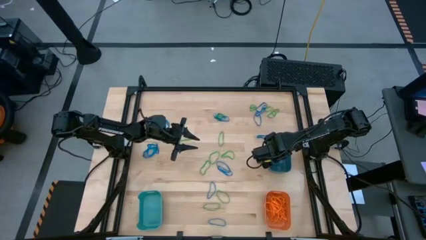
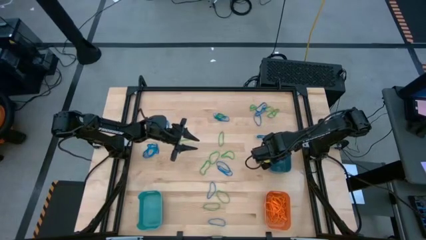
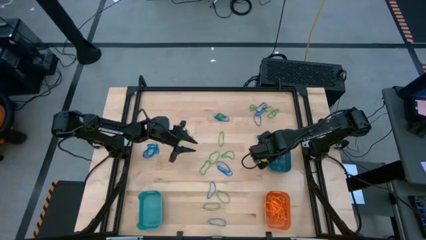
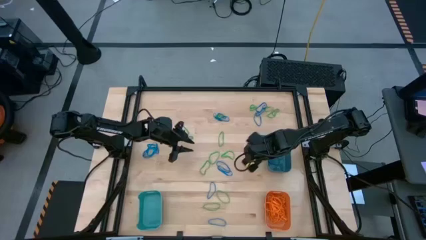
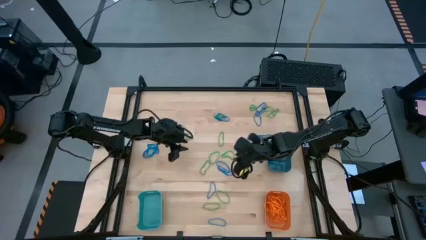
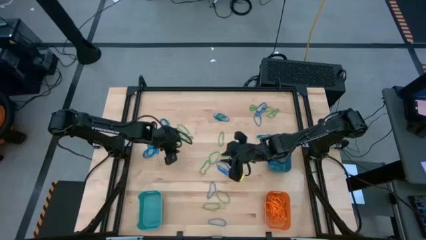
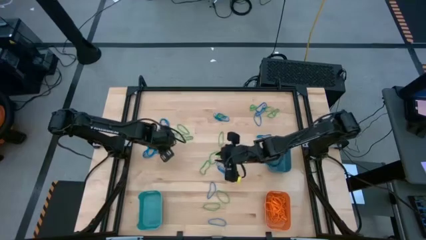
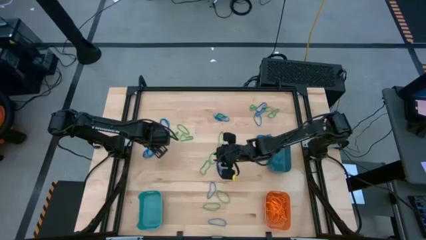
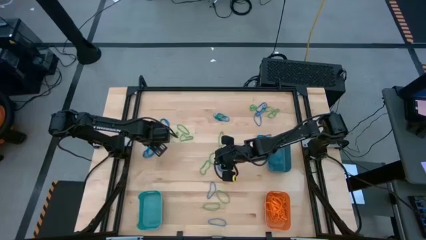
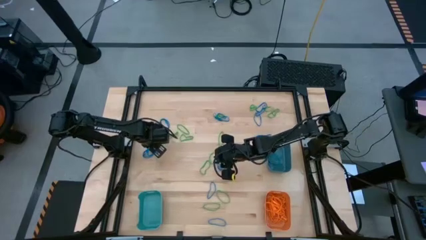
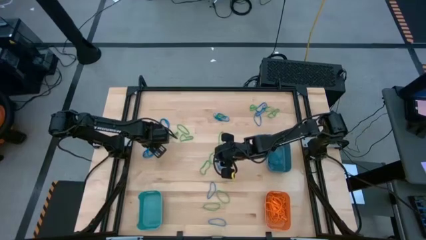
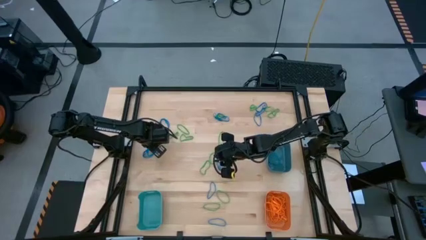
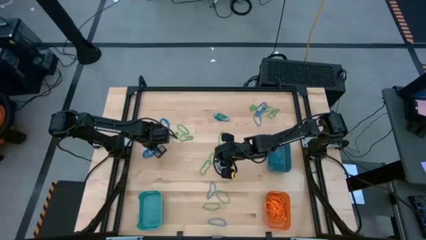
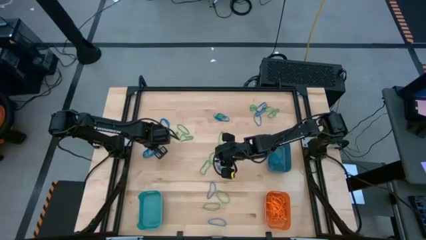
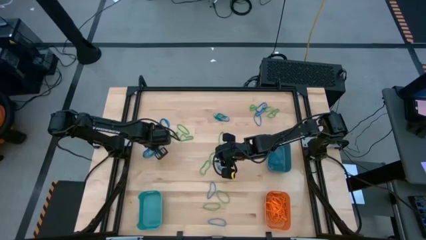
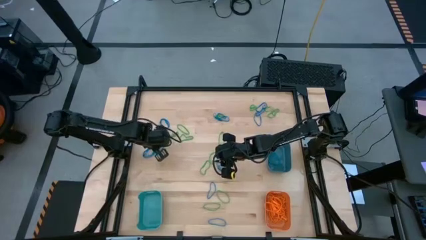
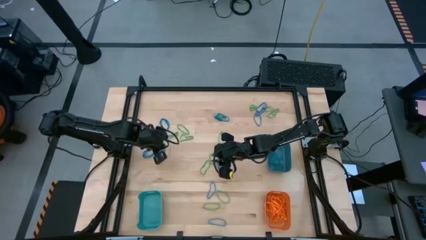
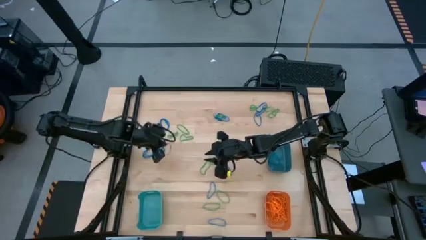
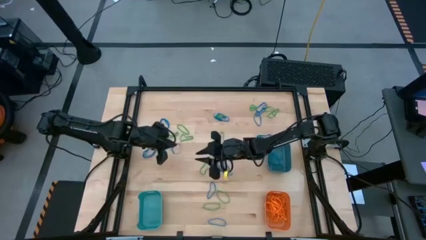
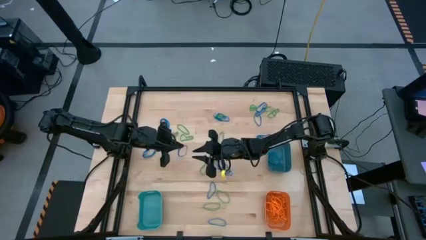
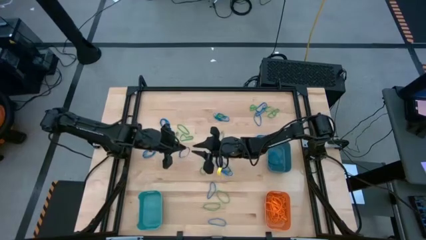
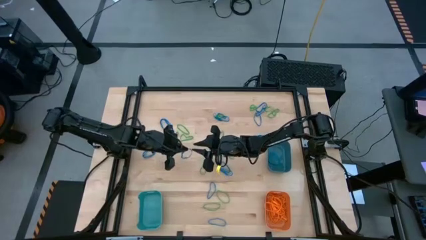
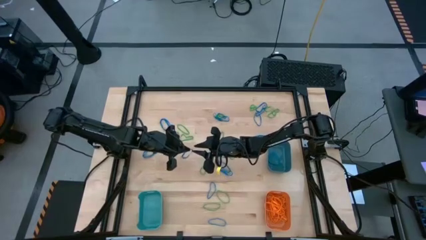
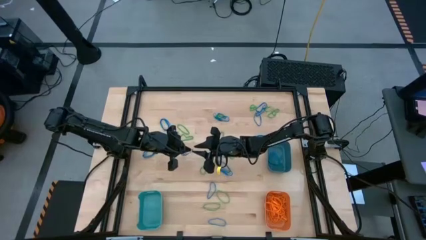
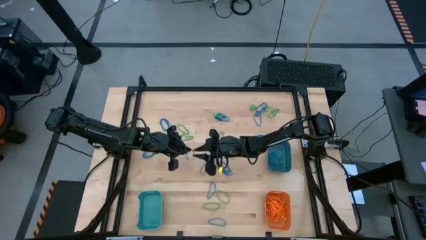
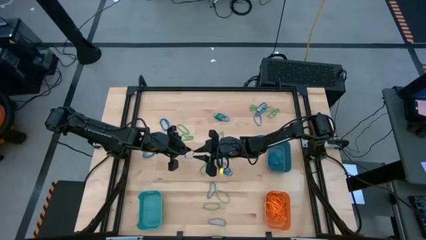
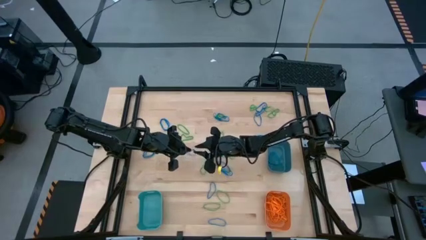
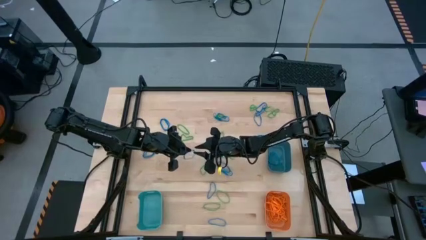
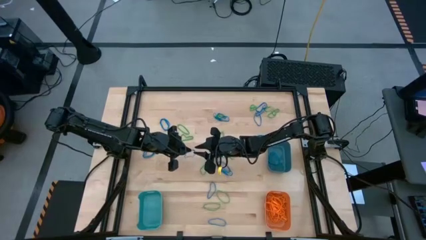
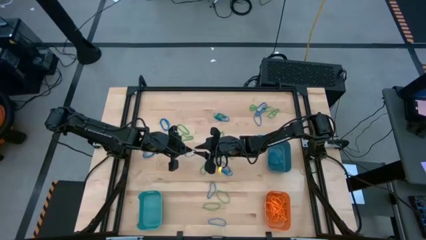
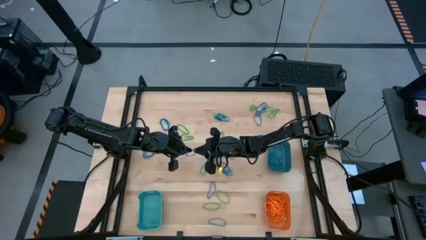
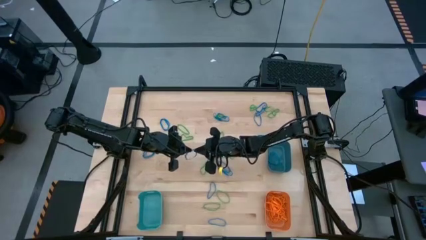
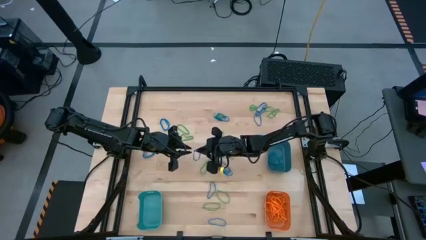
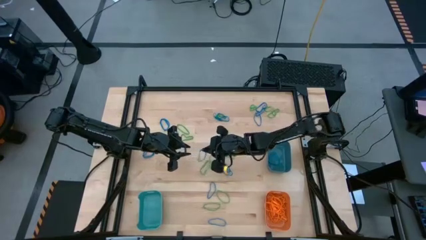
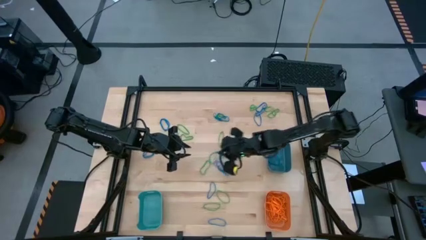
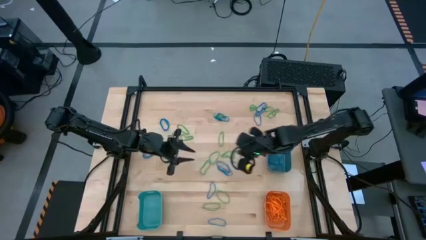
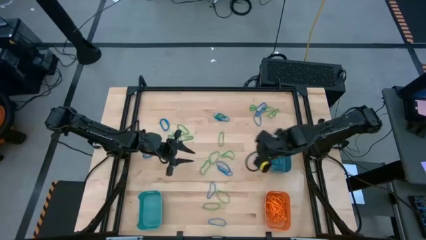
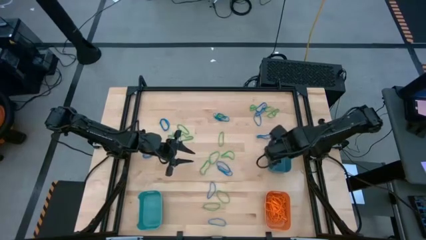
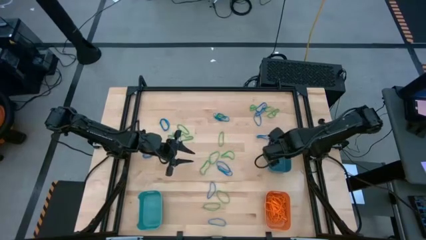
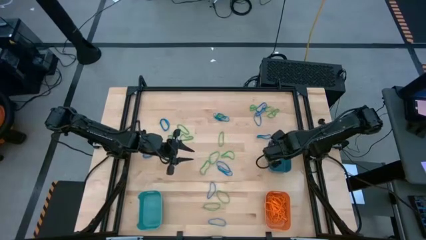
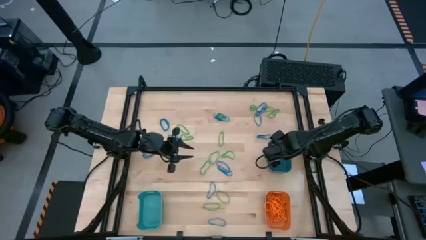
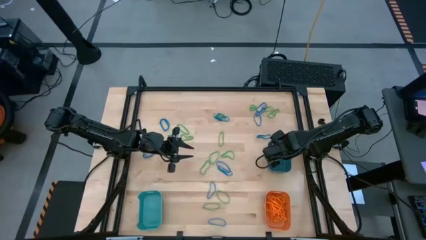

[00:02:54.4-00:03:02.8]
Task: Sort rubber bands into baskets
Put the blue rubber band into the dark blue bin

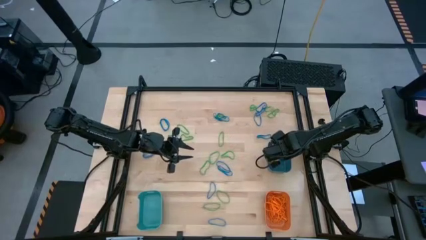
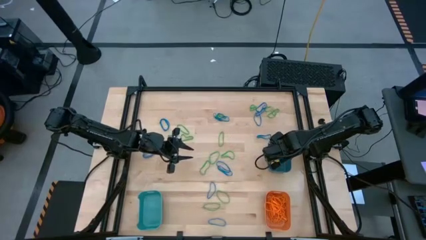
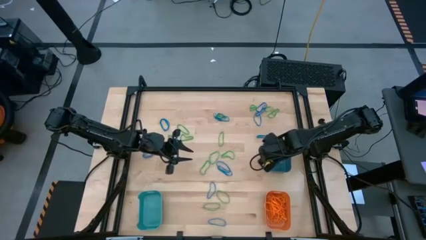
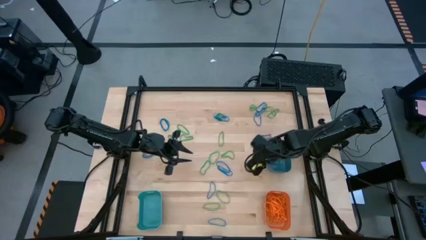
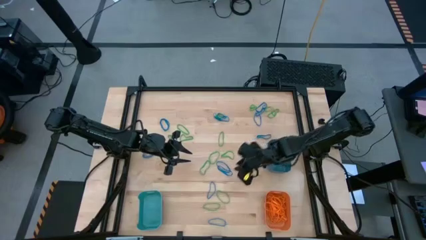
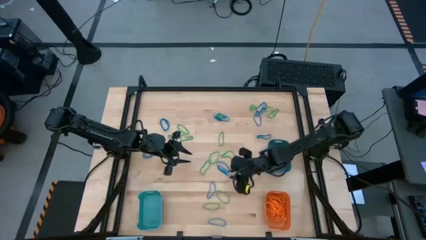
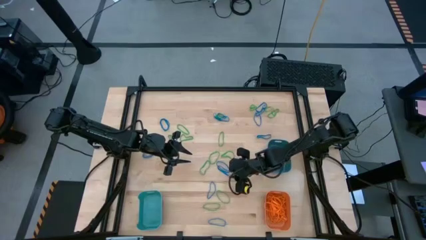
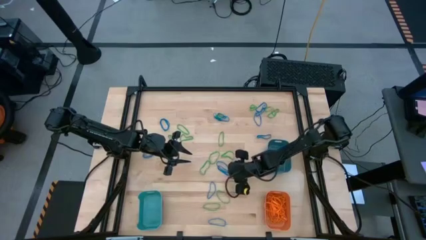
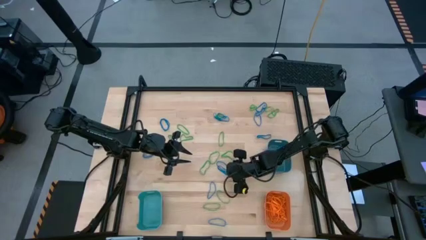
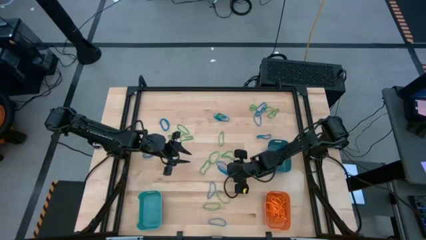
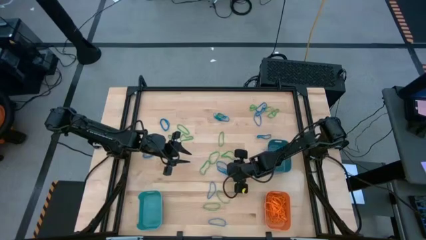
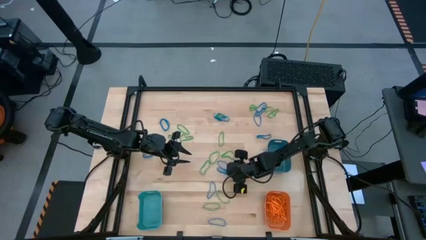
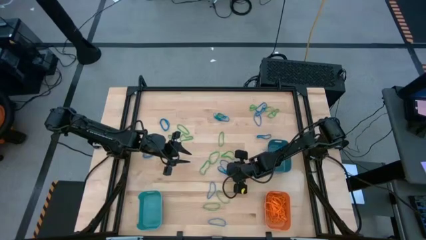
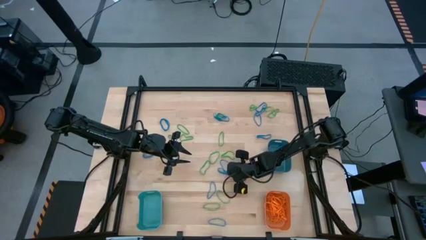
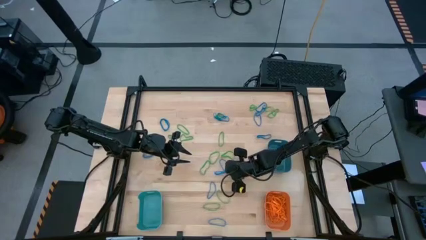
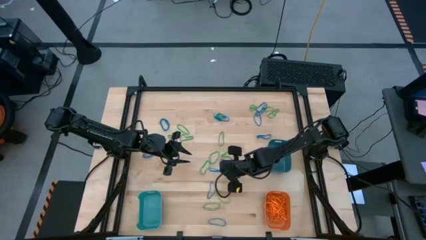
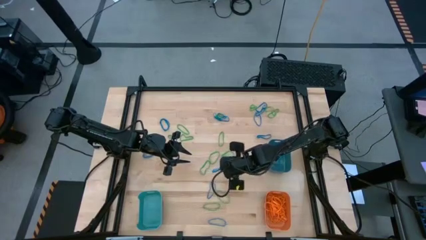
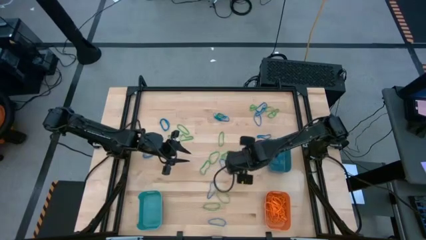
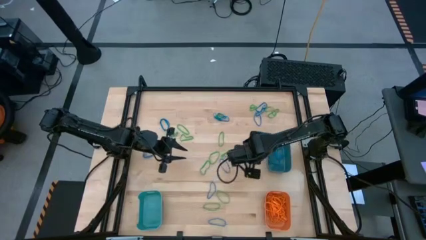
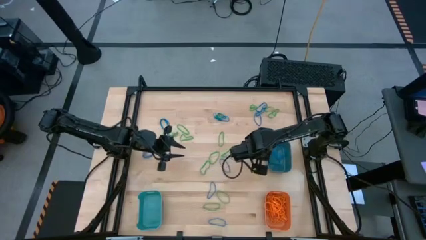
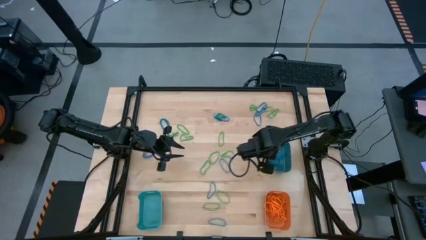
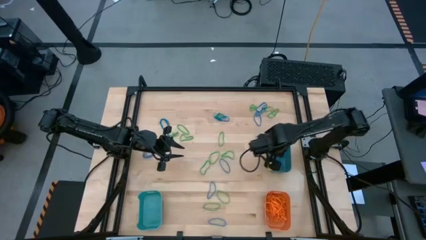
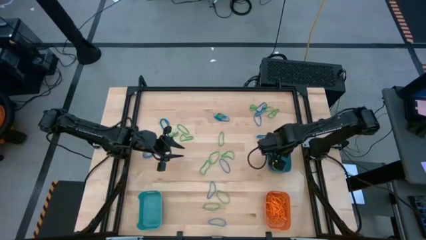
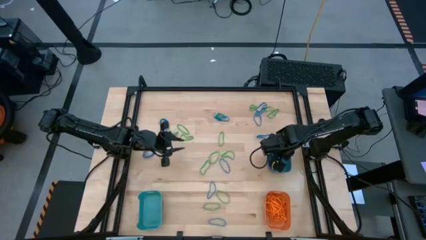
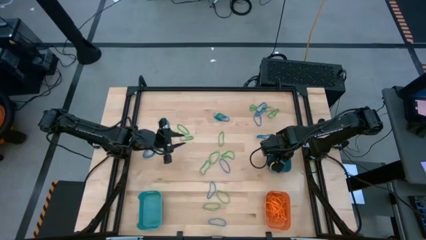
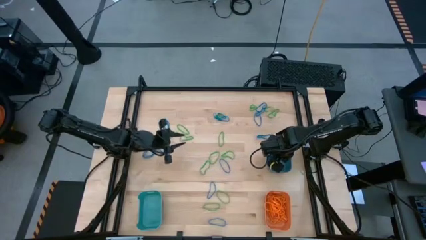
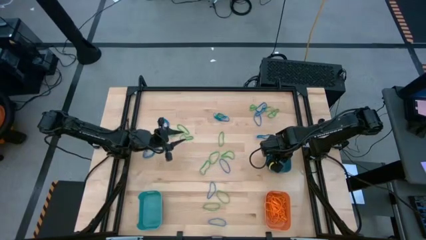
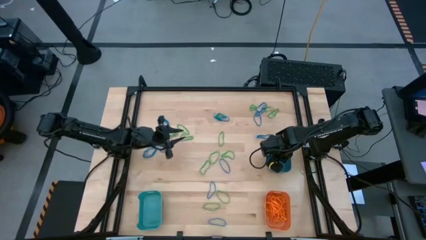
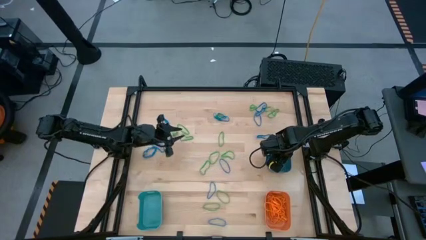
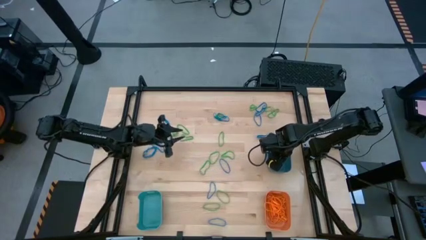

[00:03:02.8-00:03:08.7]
Put the blue rubber band into the dark blue bin

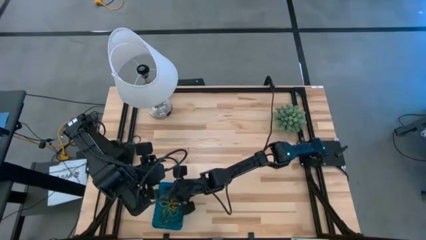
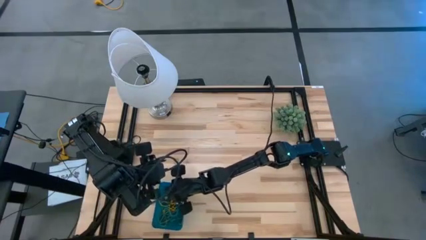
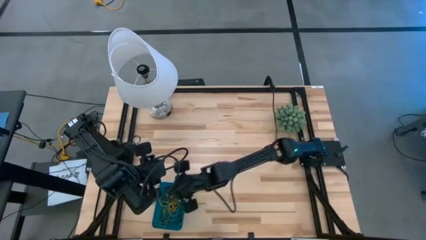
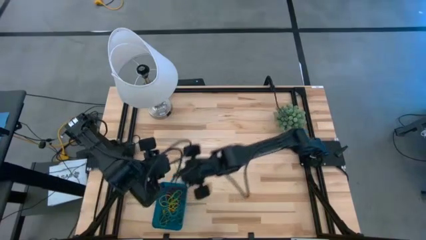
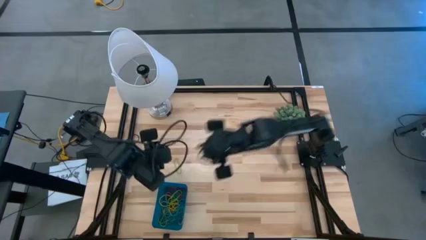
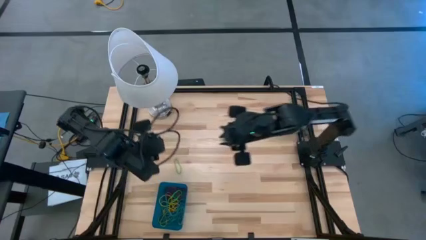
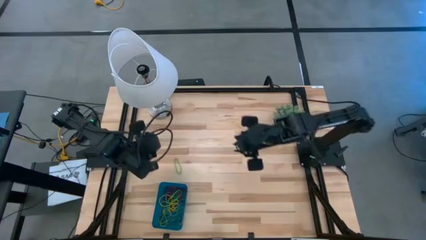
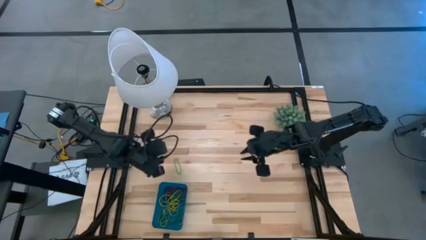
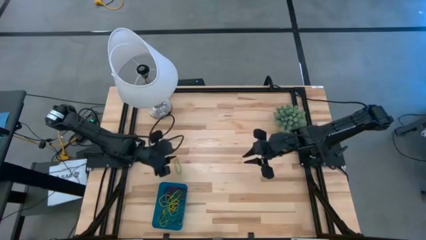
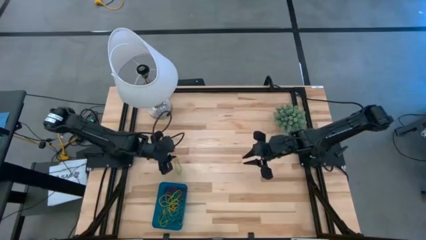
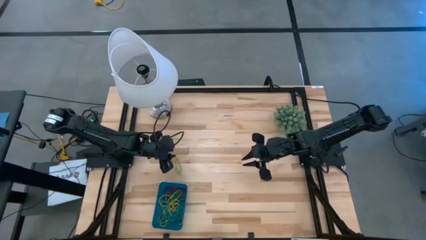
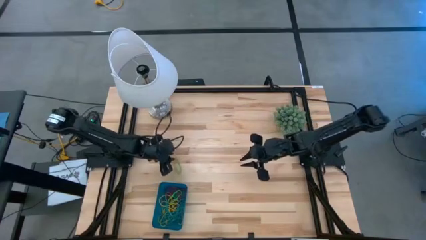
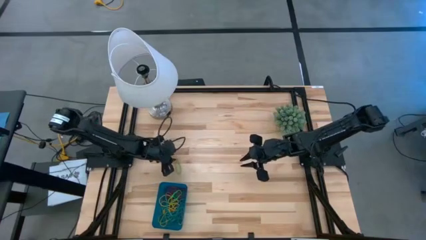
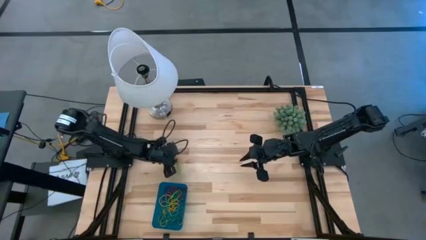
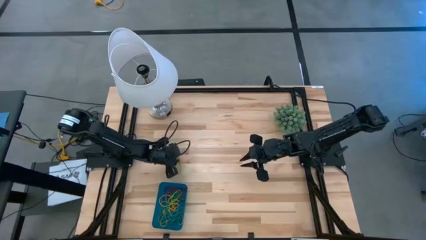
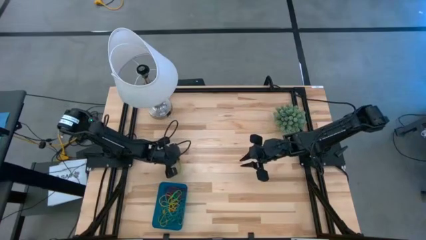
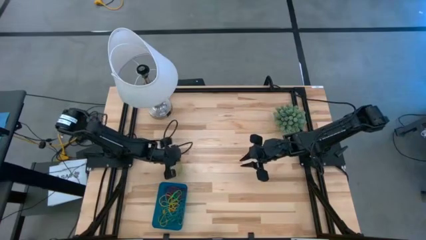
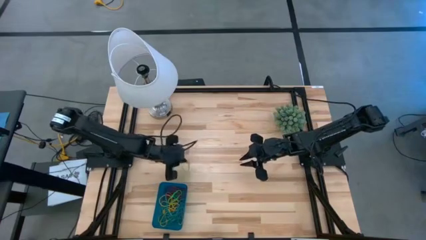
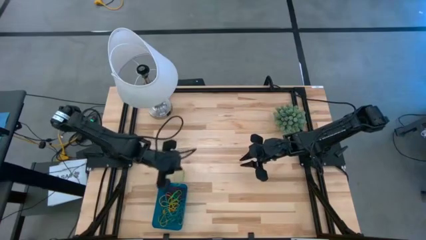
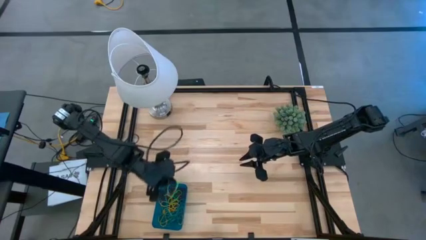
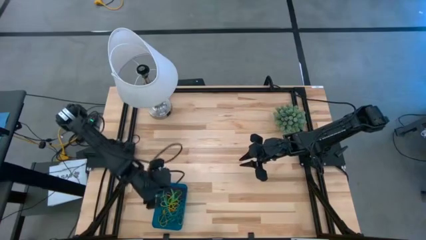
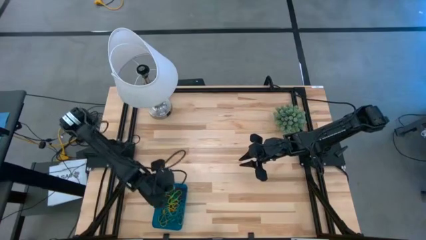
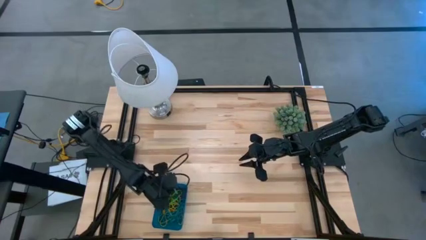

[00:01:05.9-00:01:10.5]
Task: Pick and place items into bin
Put the green rubber band into the blue bin
